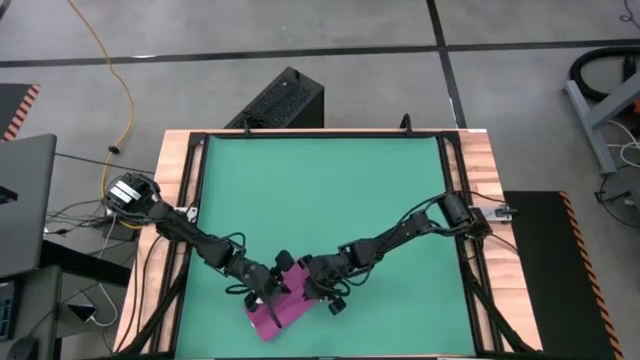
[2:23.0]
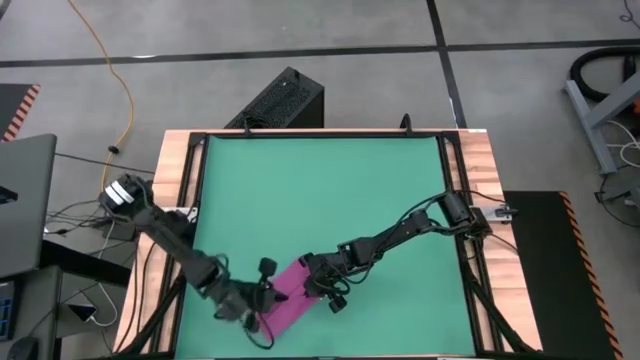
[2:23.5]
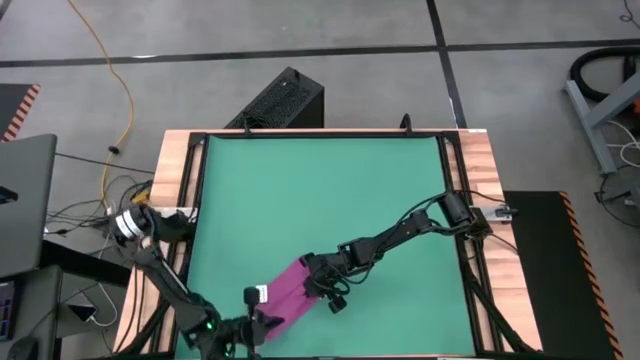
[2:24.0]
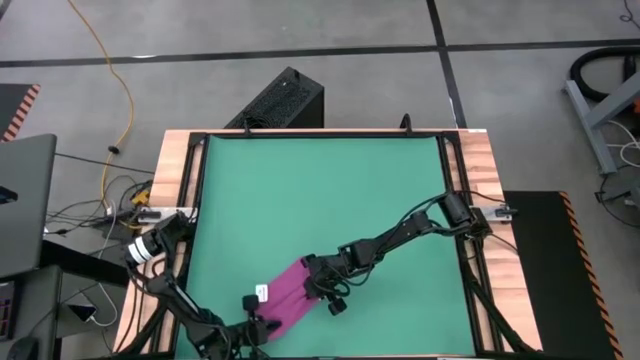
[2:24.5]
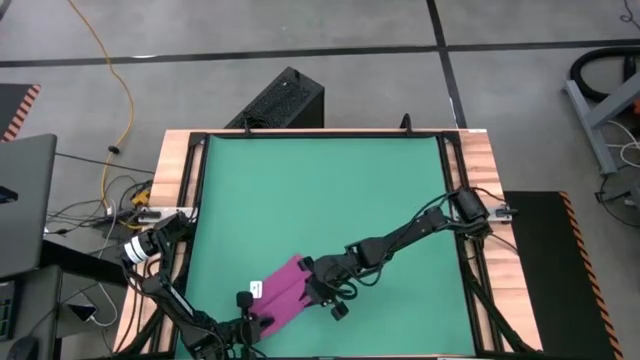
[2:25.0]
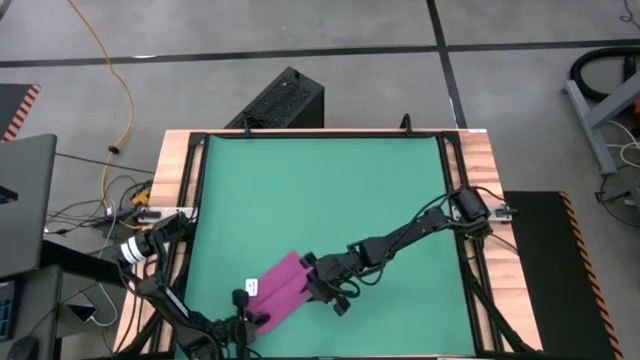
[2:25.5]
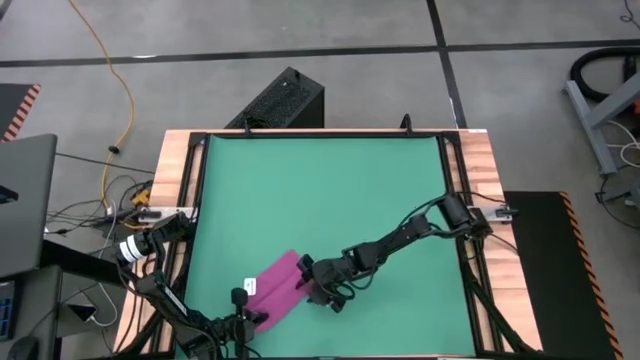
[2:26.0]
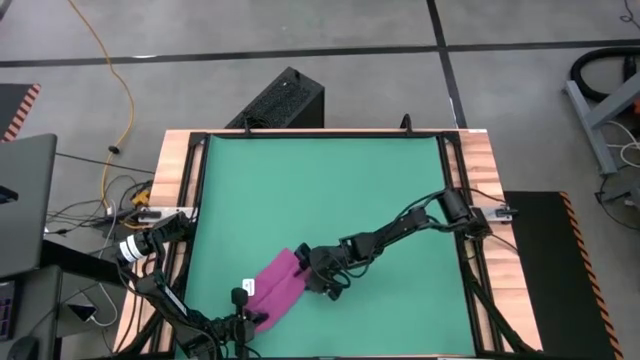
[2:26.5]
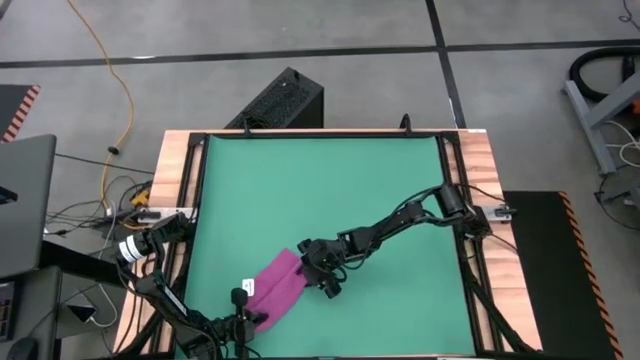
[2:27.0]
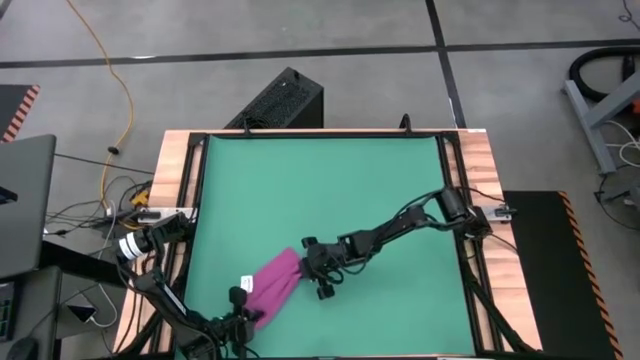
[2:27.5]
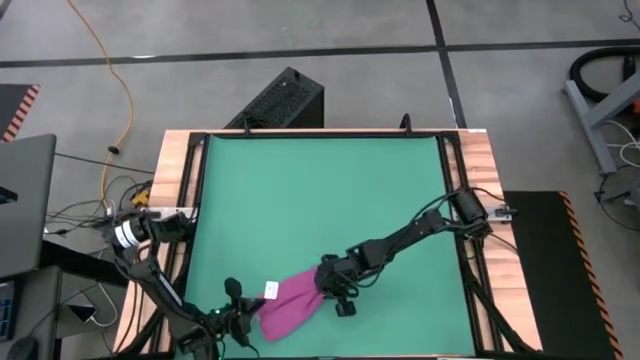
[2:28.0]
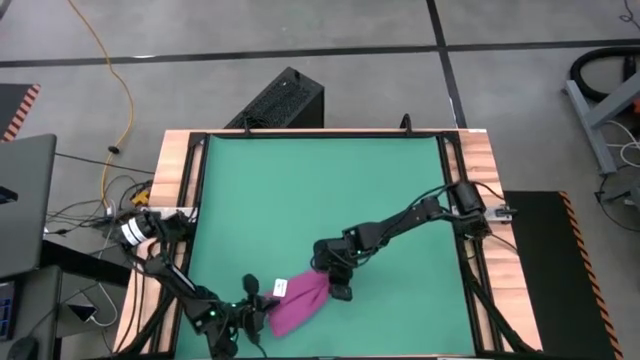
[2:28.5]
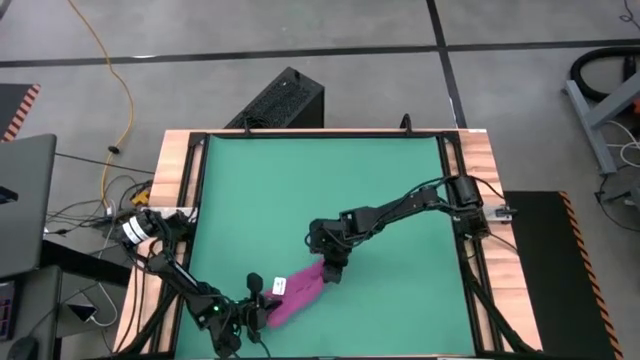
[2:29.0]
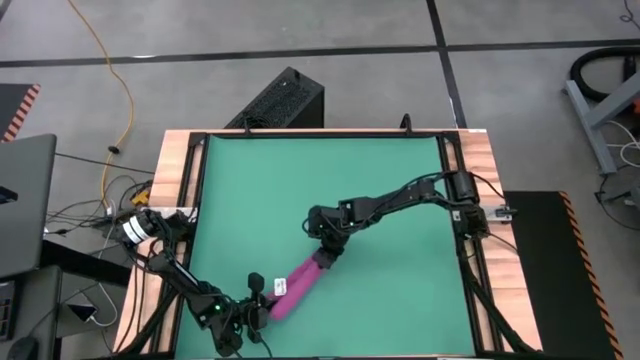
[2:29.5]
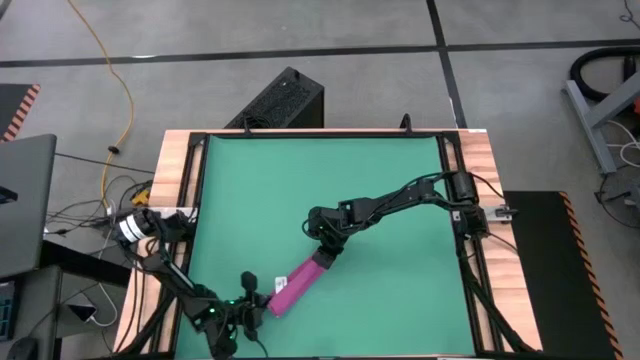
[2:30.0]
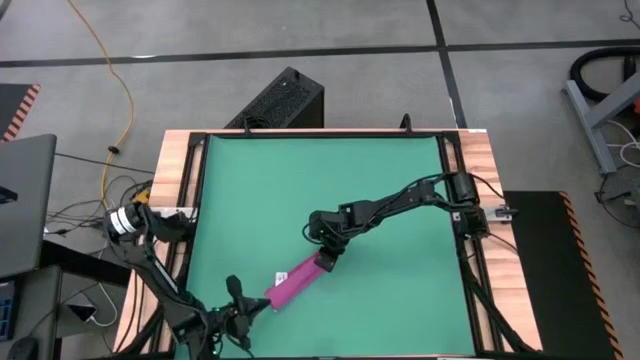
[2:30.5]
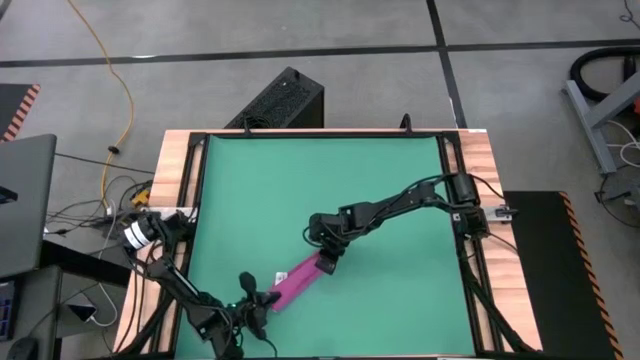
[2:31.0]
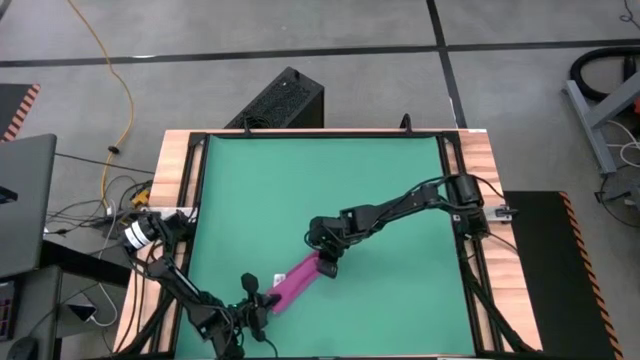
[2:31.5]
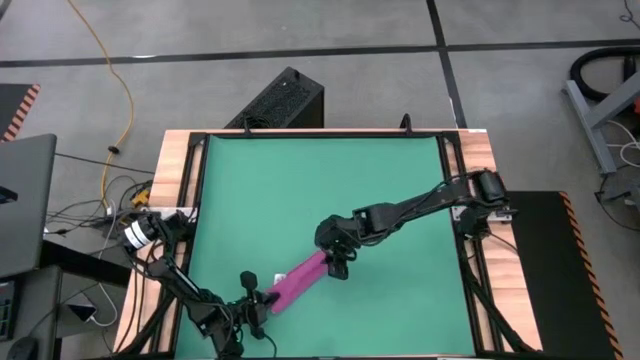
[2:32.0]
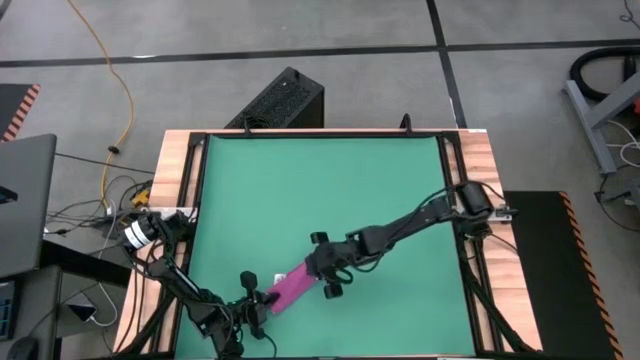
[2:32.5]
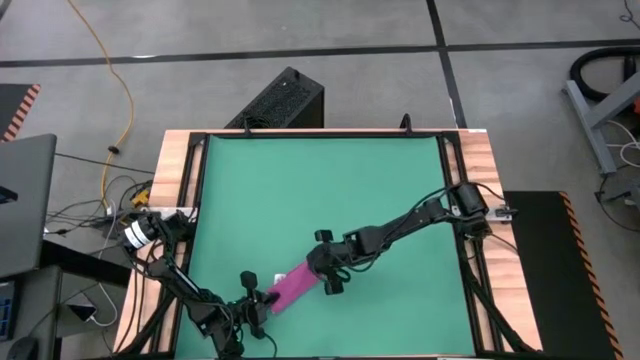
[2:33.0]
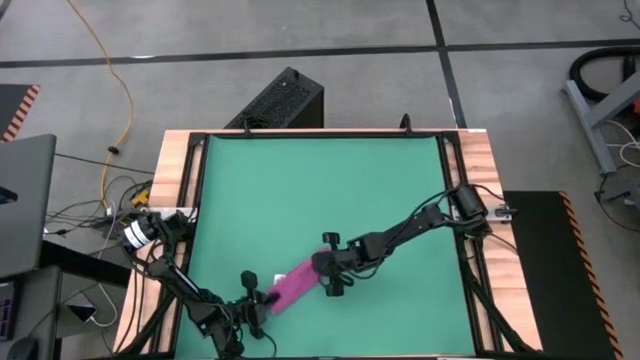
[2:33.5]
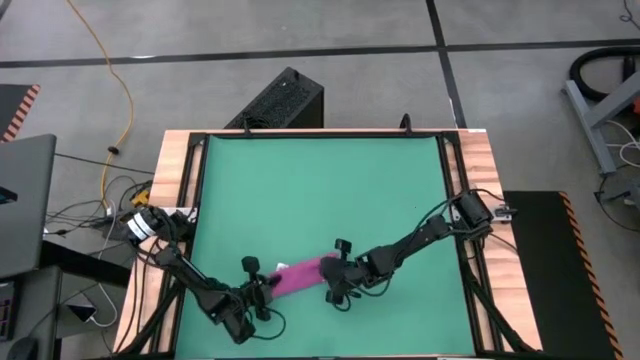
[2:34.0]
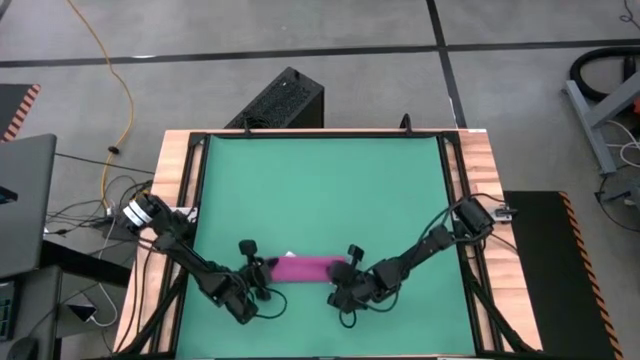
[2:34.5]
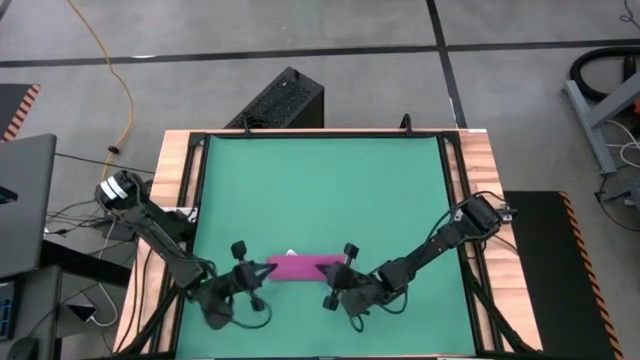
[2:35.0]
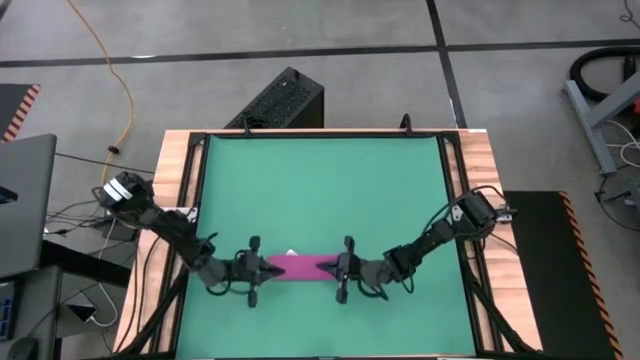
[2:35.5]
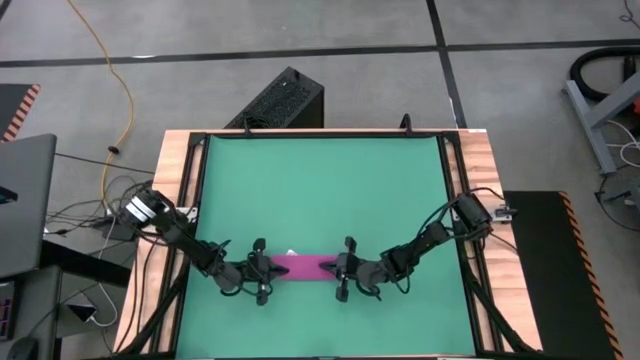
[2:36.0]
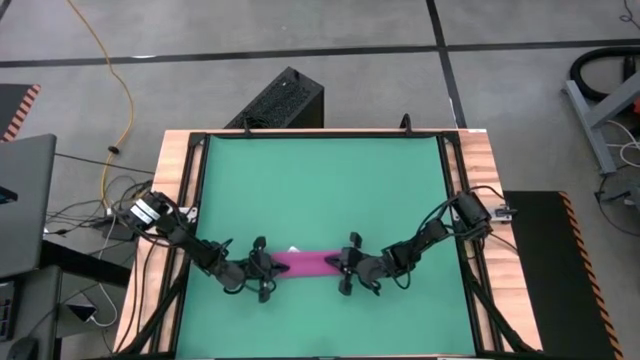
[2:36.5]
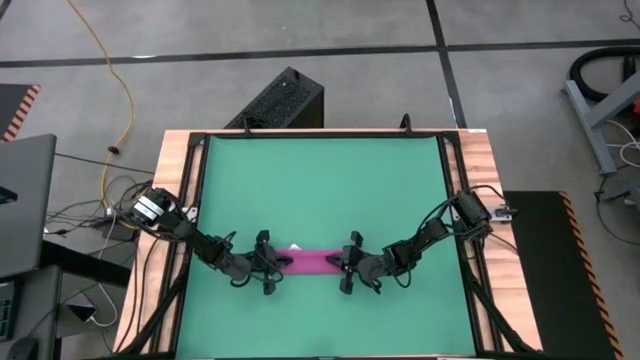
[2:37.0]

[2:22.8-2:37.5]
Task: Roll towel
Roll the pink towel

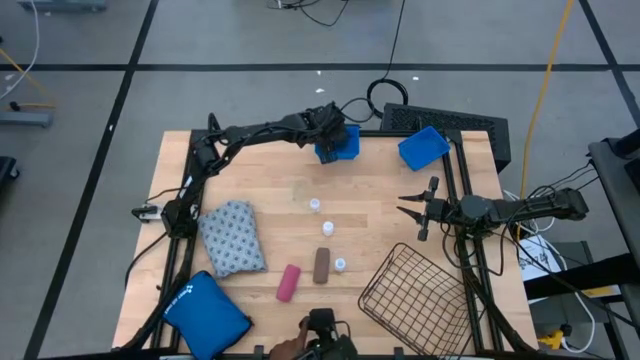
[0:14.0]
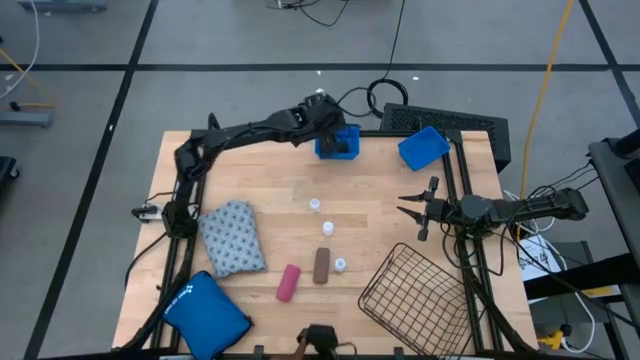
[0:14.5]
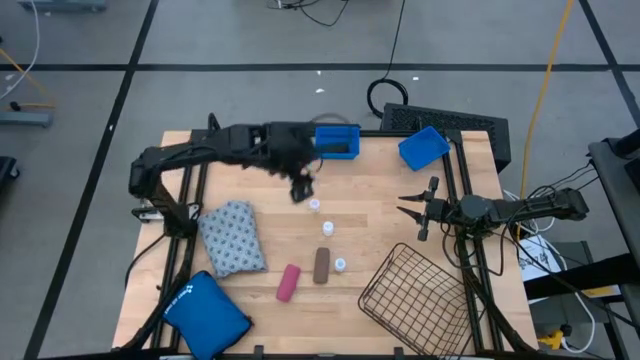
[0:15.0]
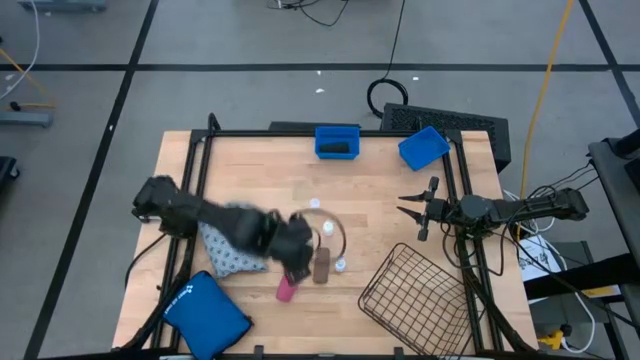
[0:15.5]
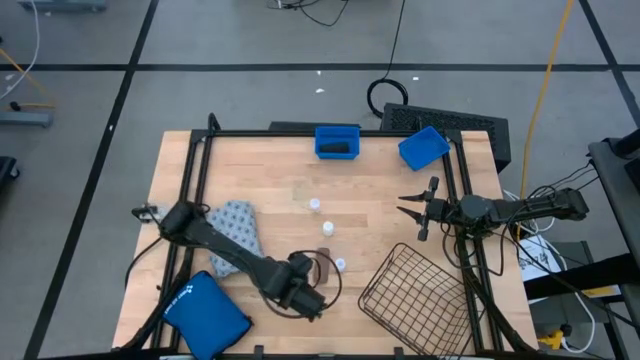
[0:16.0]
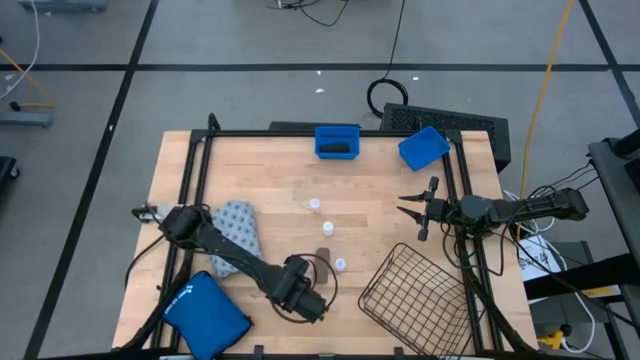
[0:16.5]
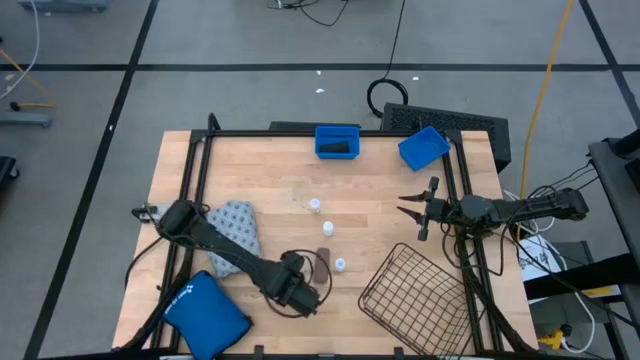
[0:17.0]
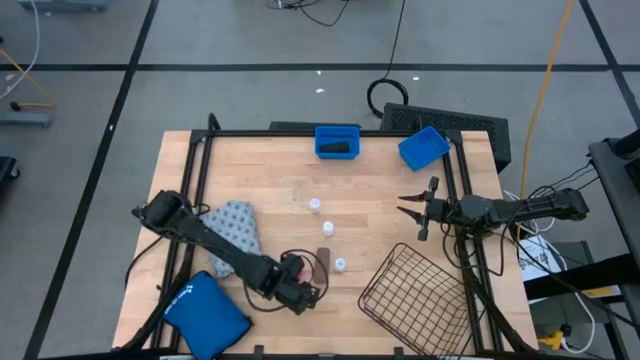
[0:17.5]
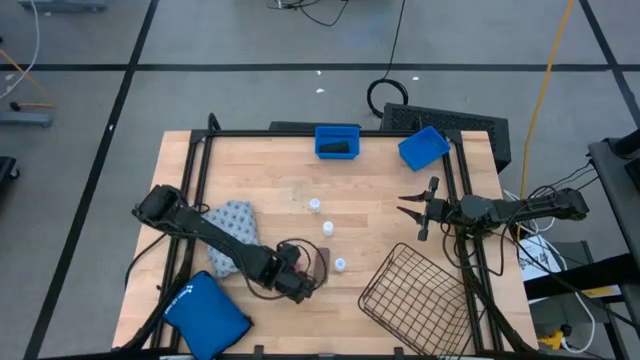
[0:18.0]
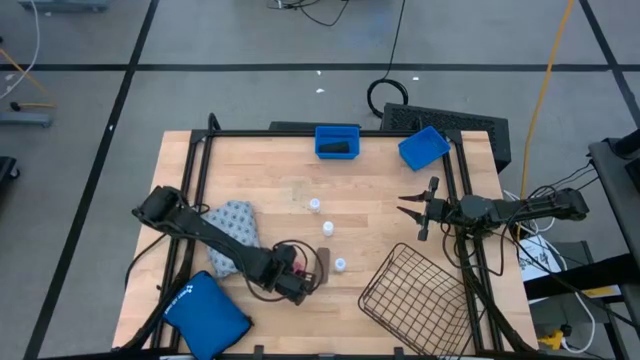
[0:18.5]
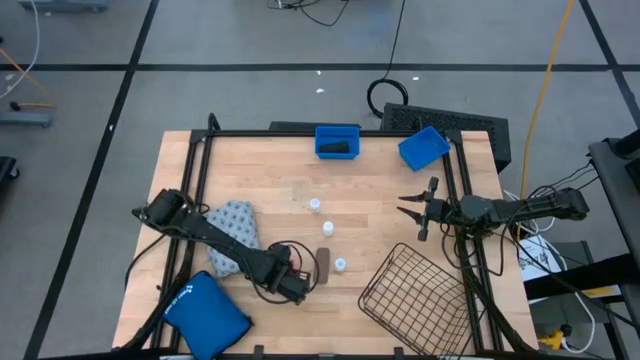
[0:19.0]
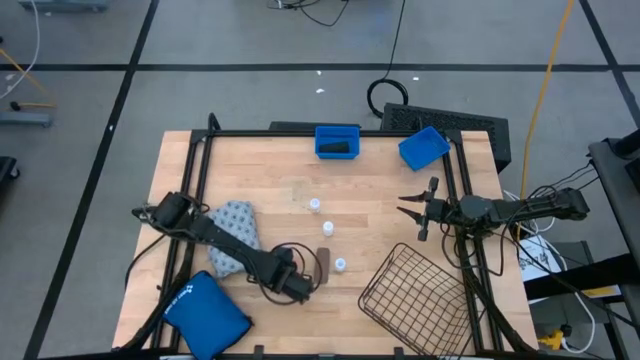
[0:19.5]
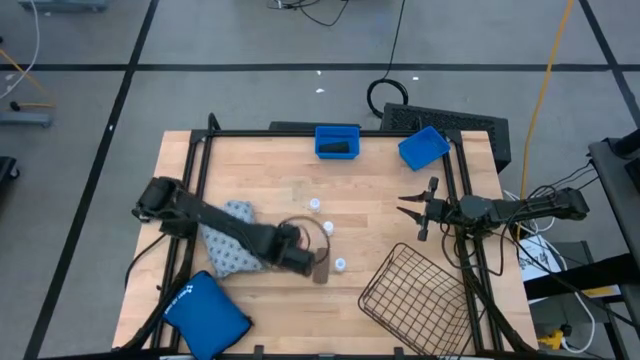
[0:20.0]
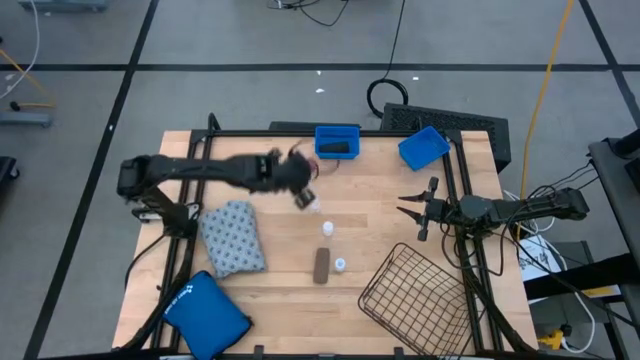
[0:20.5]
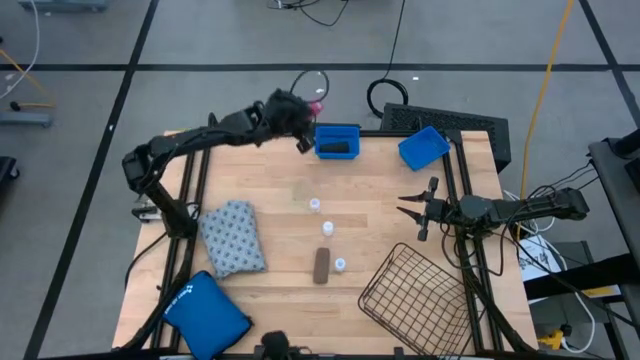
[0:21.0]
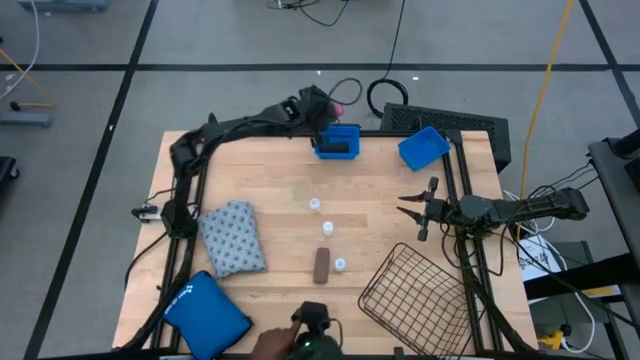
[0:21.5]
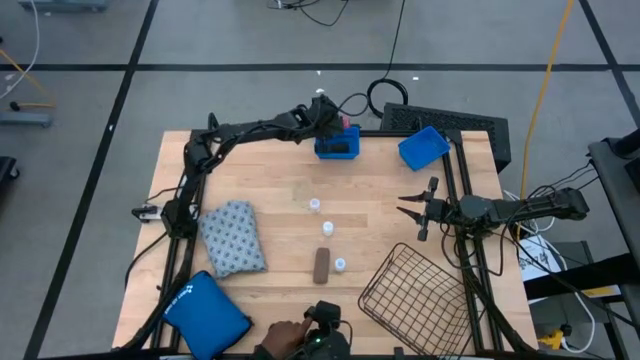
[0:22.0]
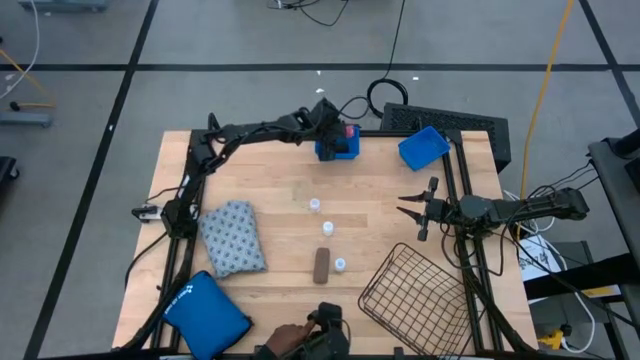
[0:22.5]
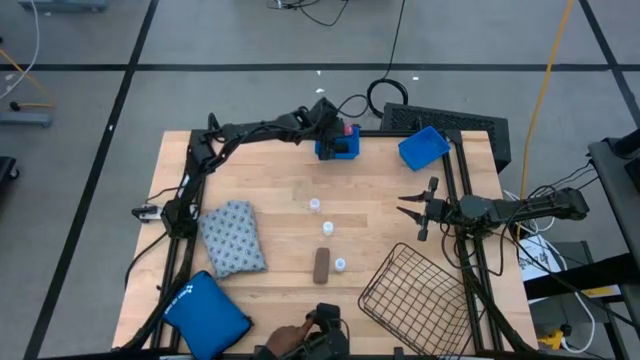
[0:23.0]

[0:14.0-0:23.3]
Task: Pick & Place Medicine items
Put the pink rolled gauze into the left blue bin
